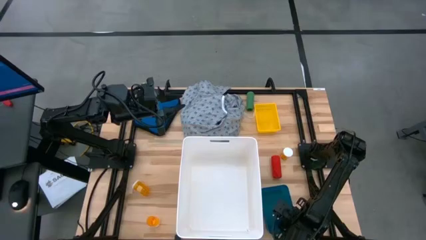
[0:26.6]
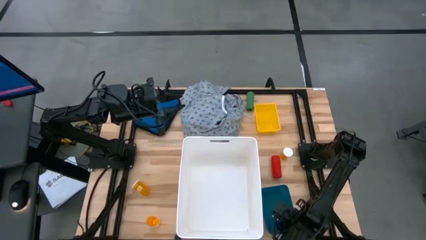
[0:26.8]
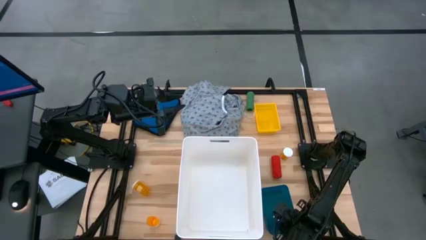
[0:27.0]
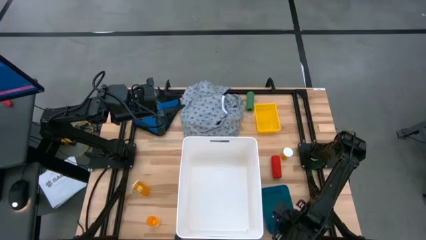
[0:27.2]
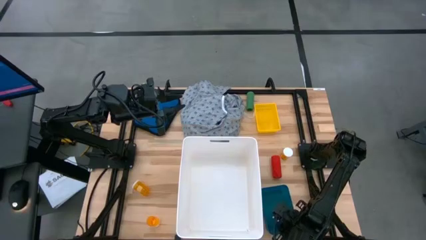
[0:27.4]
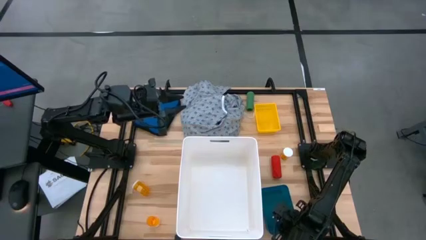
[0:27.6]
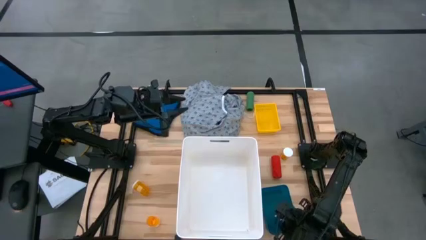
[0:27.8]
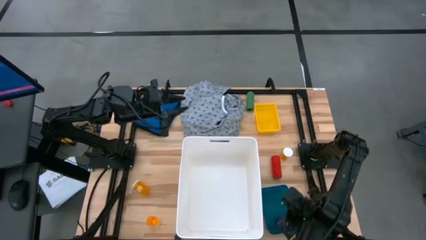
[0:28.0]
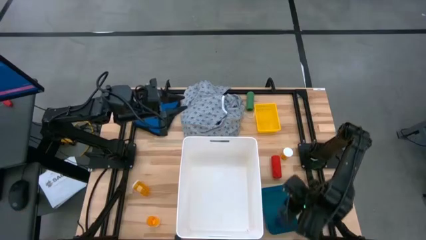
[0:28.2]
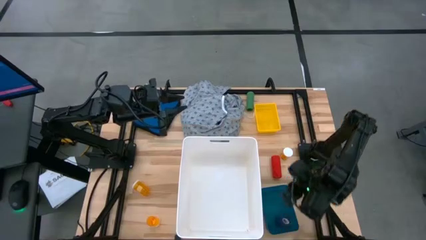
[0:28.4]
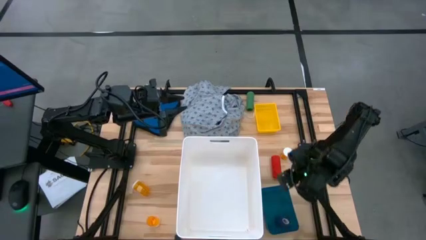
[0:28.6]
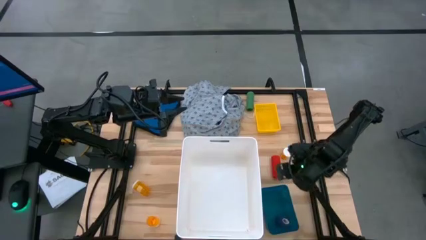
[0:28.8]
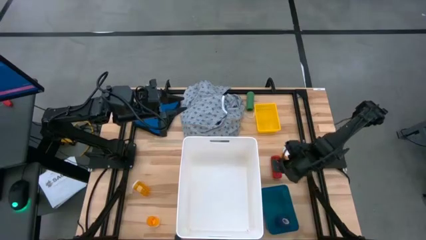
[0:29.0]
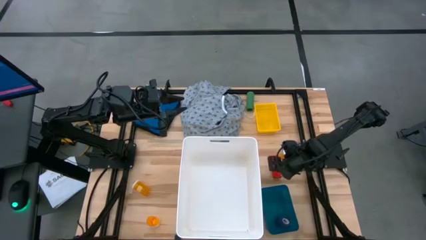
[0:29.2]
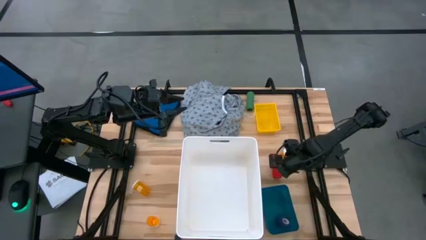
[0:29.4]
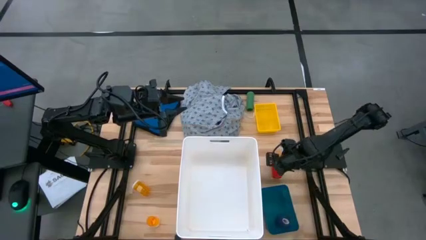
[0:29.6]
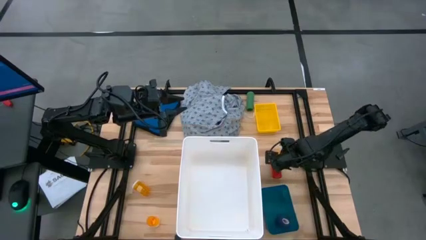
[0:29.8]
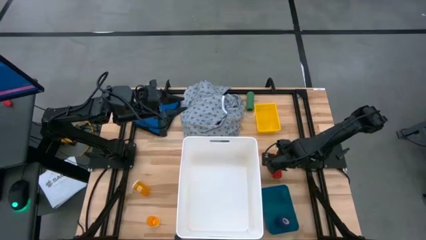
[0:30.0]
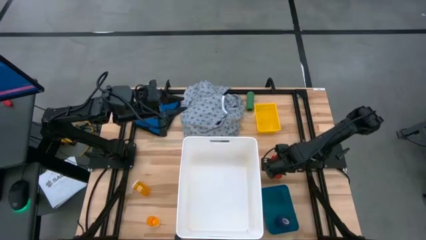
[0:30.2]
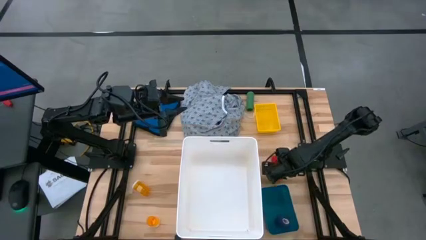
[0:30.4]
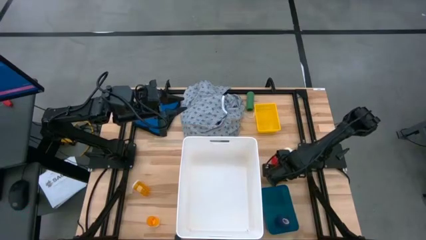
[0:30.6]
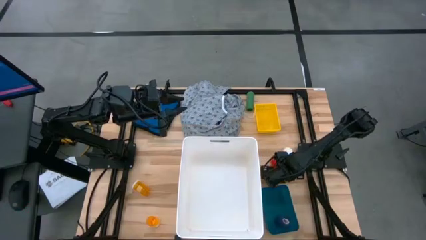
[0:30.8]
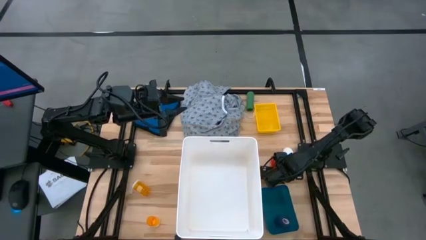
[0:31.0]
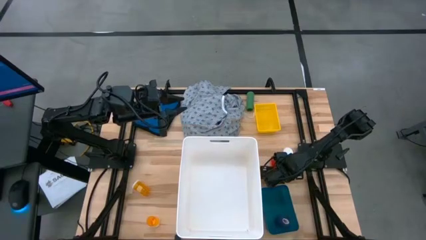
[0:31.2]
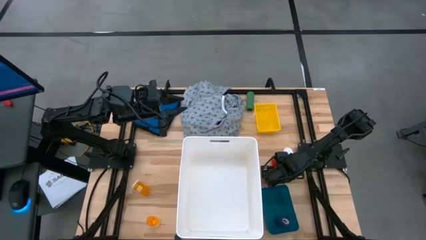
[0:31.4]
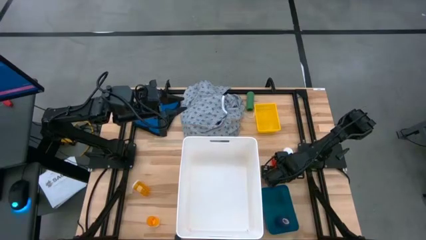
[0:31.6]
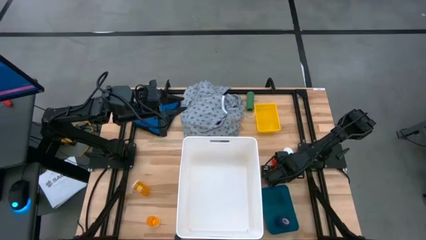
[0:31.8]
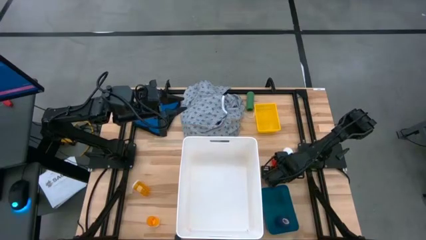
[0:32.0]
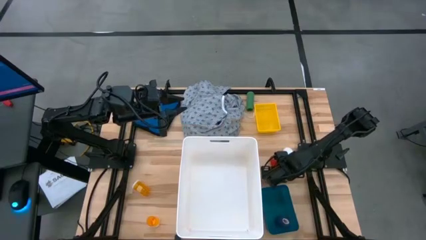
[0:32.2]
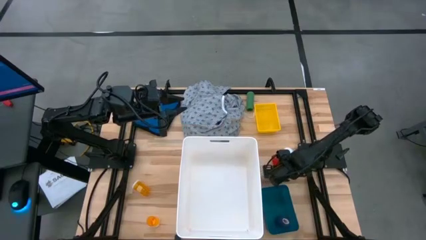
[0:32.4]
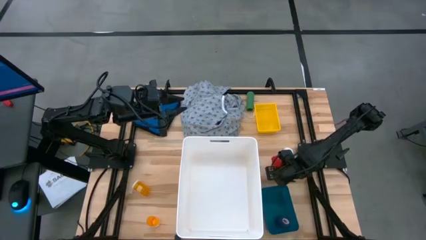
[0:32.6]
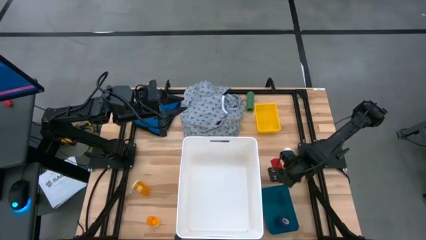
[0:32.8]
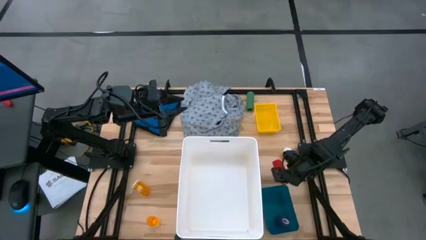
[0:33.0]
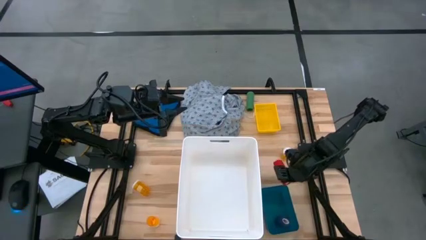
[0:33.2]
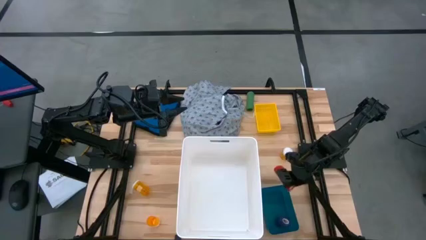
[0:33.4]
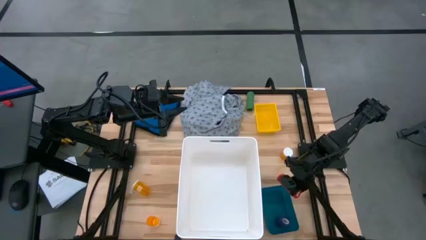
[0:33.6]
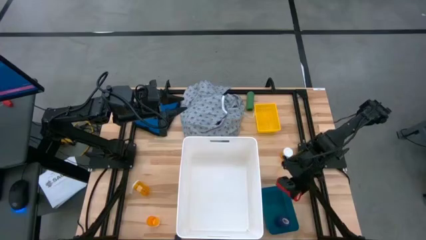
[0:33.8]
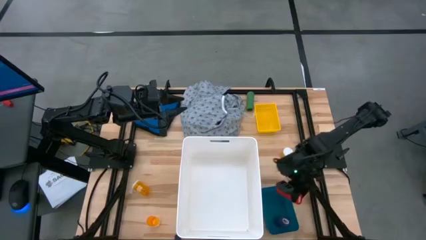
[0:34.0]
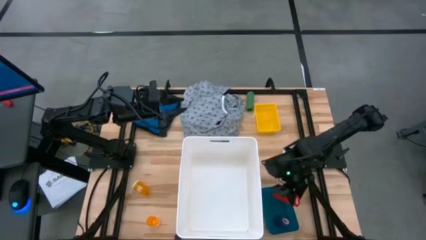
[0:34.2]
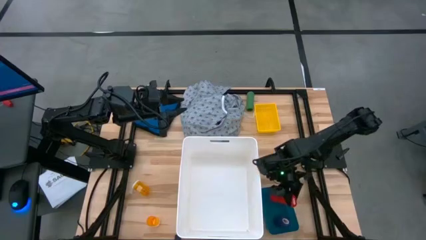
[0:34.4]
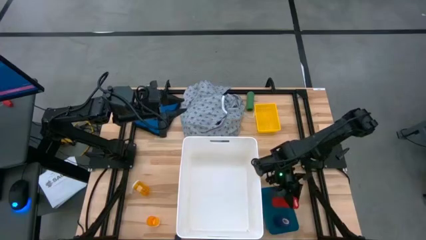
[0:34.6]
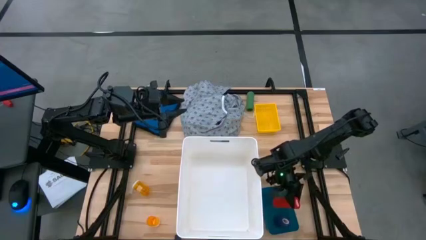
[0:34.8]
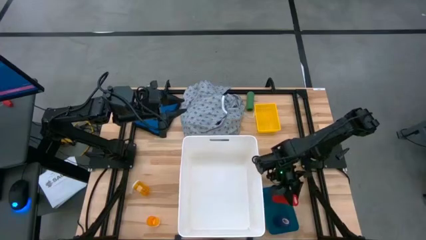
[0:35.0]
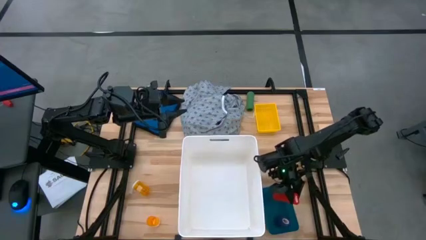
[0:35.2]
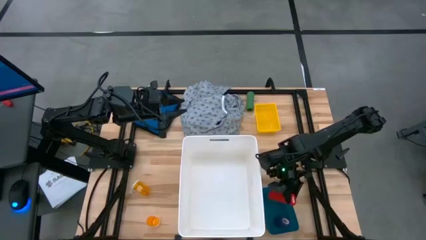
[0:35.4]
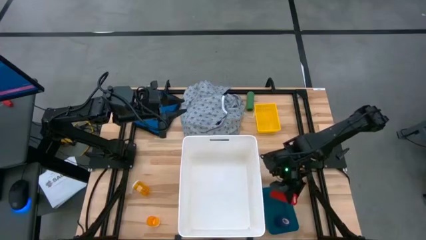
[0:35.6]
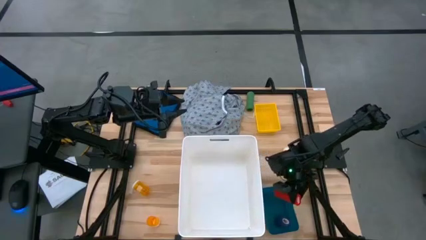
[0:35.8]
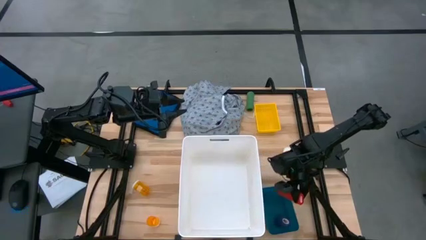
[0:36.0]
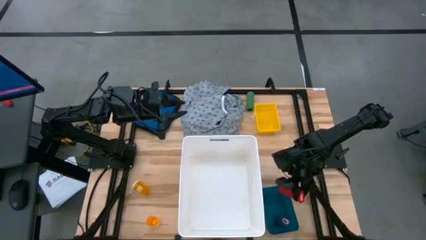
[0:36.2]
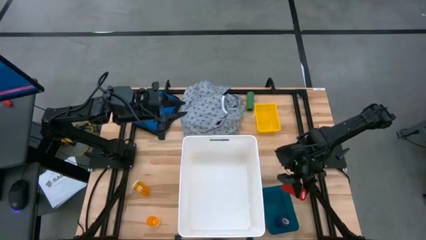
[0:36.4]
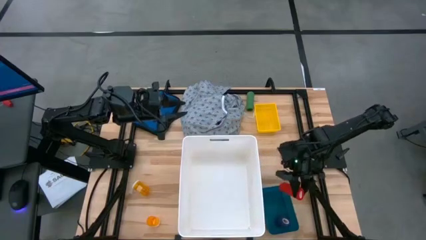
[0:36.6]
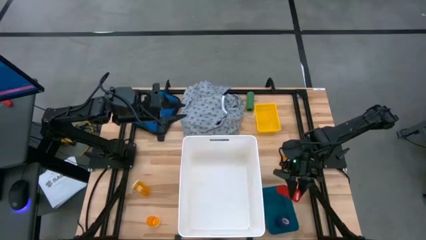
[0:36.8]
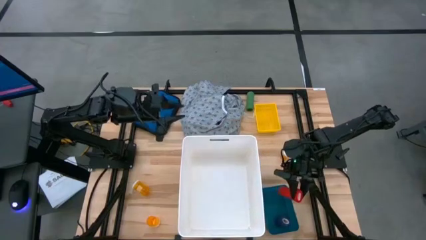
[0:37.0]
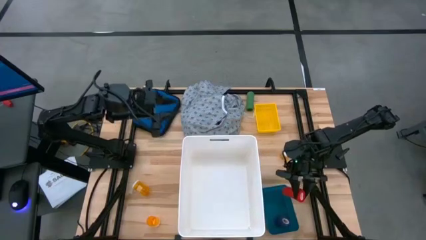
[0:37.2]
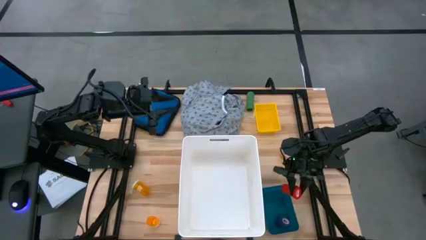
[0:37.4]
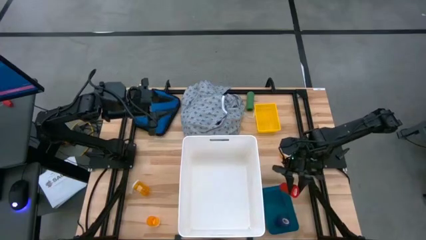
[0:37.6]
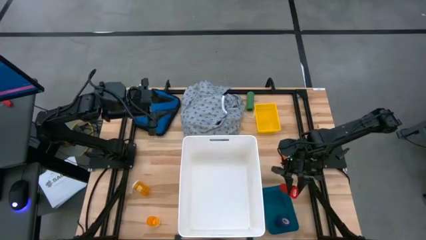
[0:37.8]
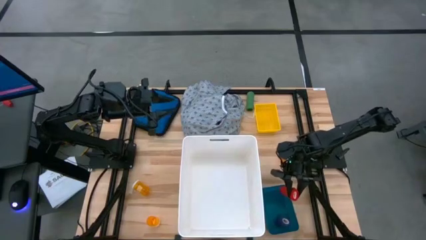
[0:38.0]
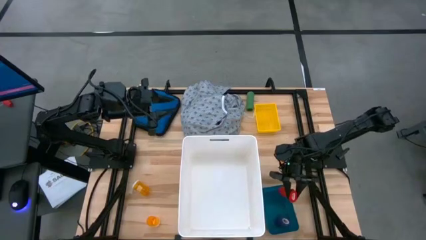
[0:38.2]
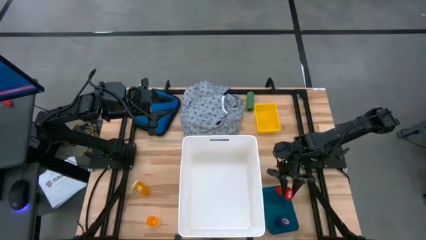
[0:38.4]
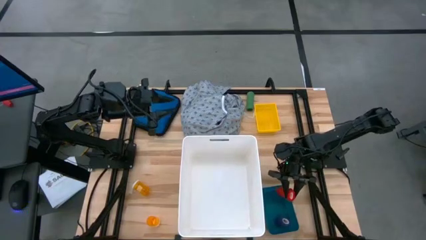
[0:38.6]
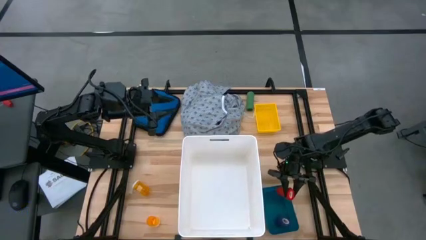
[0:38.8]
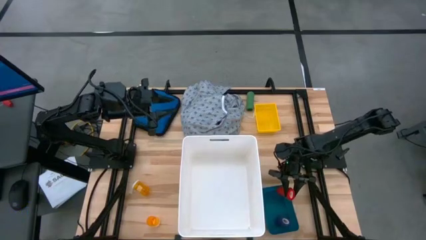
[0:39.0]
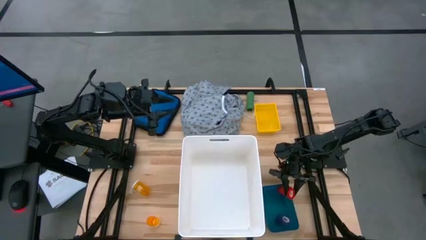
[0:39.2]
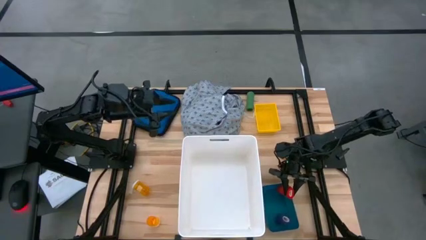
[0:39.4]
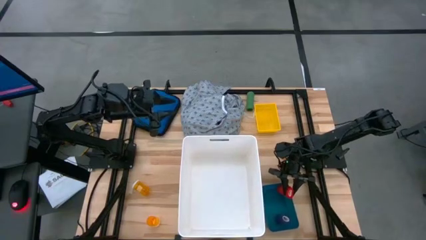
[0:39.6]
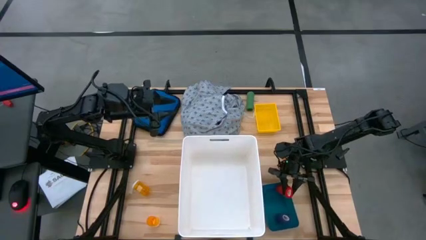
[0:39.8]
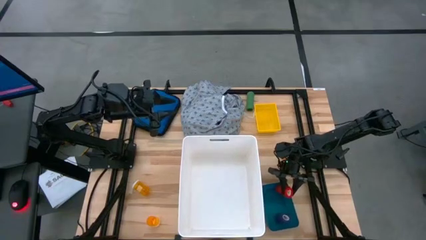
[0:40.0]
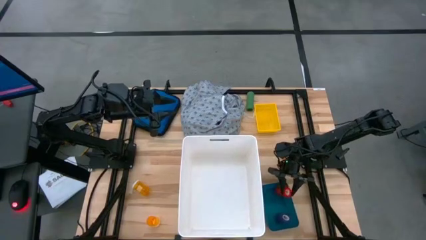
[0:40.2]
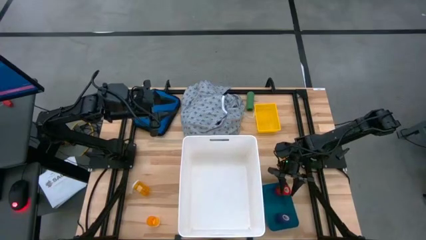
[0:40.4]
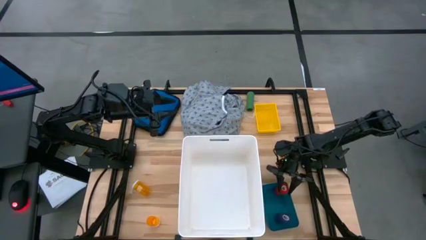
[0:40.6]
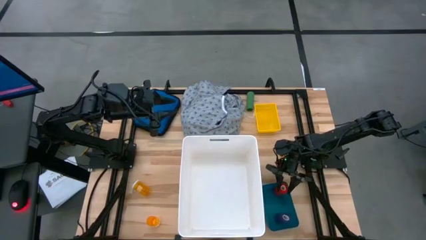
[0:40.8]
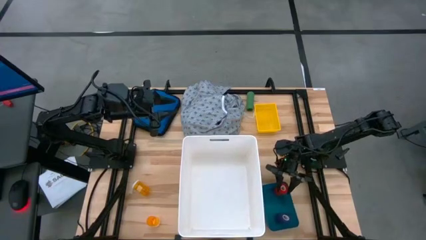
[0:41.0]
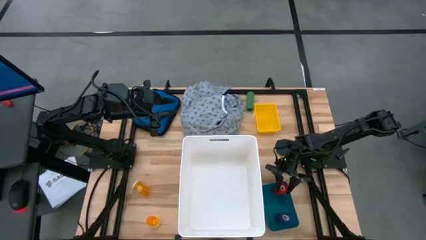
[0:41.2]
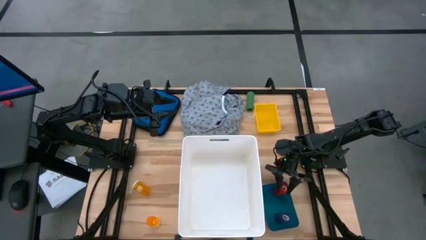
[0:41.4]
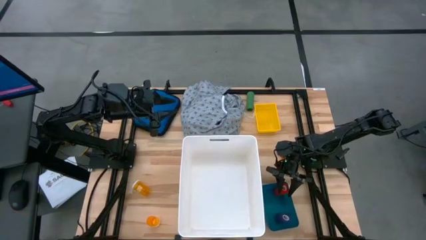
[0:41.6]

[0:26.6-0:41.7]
Task: Pick & place medical supplies in basket/bin
Put the red bandage into the blue bin
